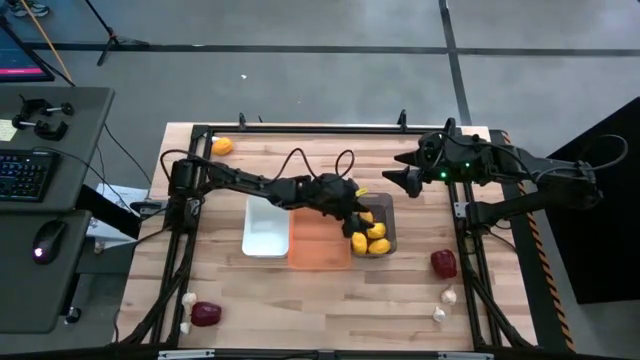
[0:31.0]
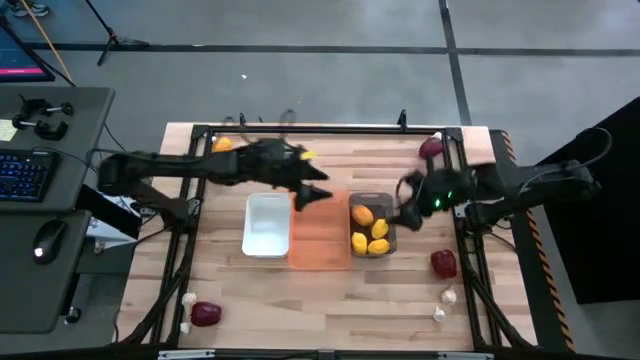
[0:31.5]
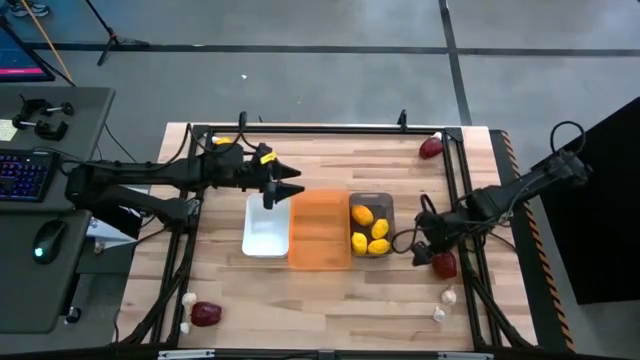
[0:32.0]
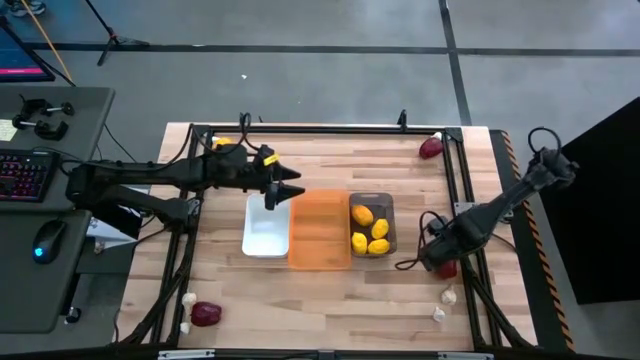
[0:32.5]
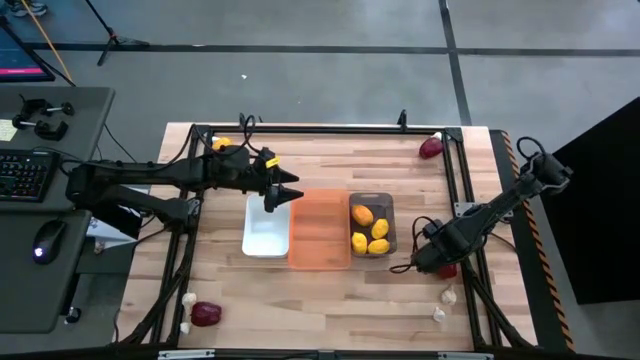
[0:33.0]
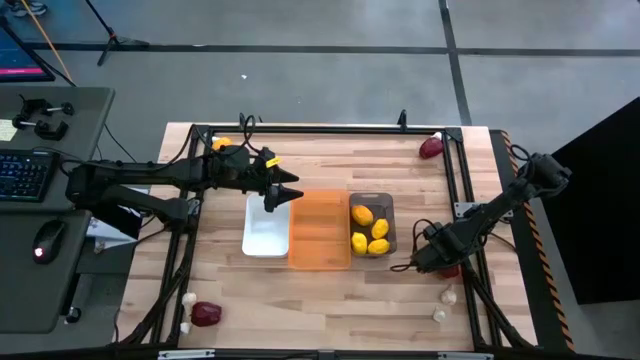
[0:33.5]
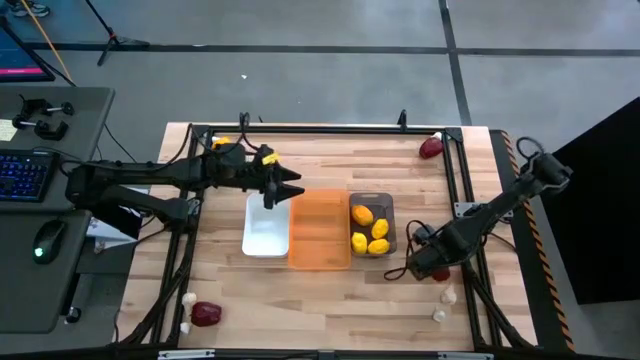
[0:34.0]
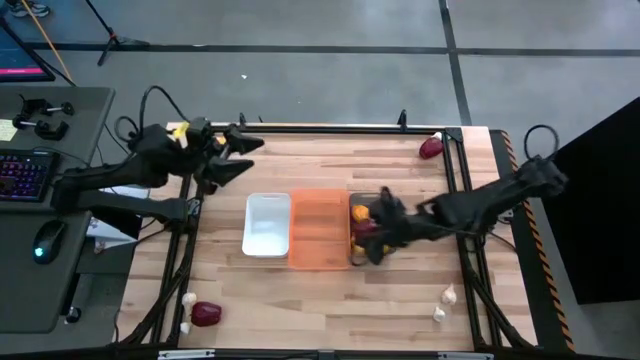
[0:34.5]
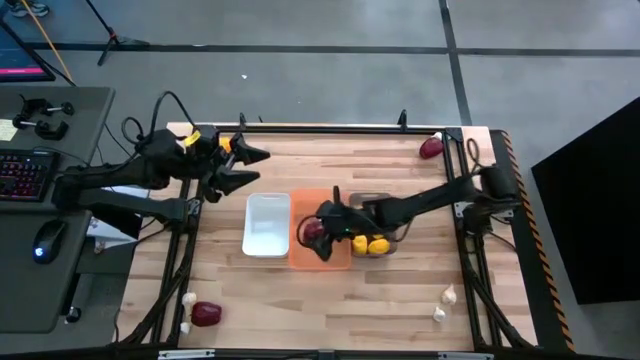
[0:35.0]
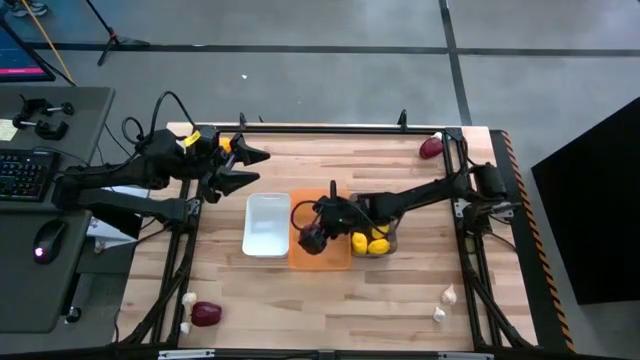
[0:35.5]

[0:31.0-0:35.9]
Task: Sort produce into baskets
Put the red apple into the orange bin

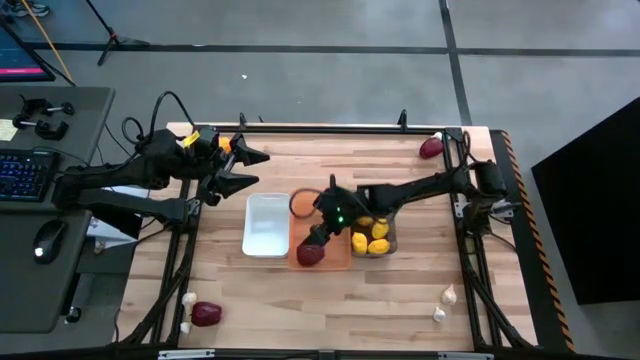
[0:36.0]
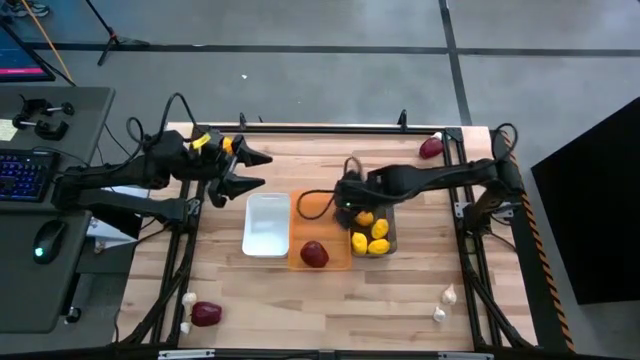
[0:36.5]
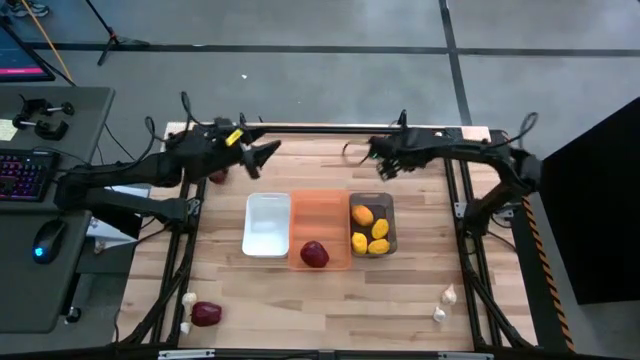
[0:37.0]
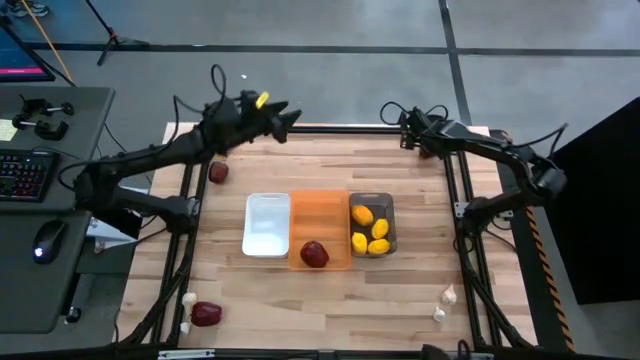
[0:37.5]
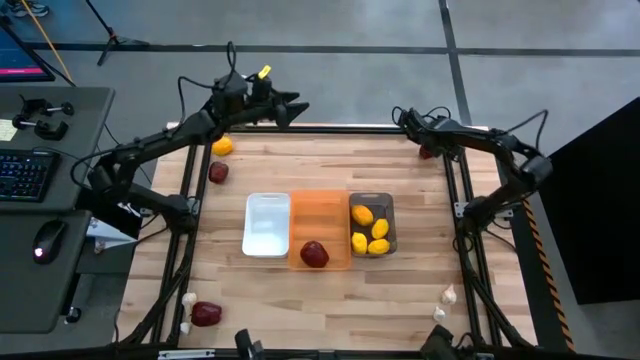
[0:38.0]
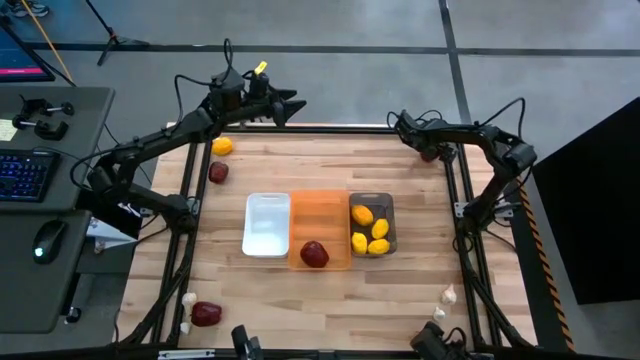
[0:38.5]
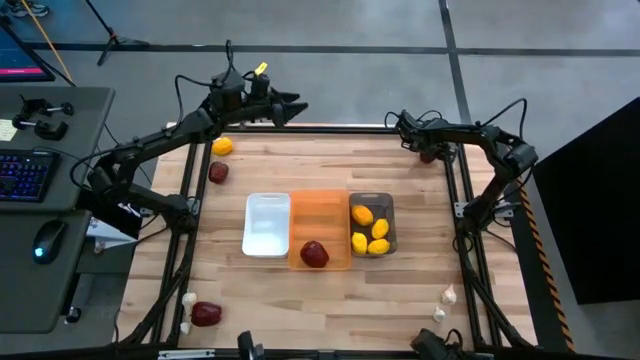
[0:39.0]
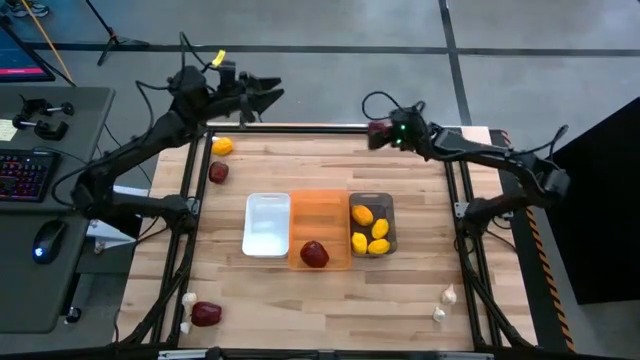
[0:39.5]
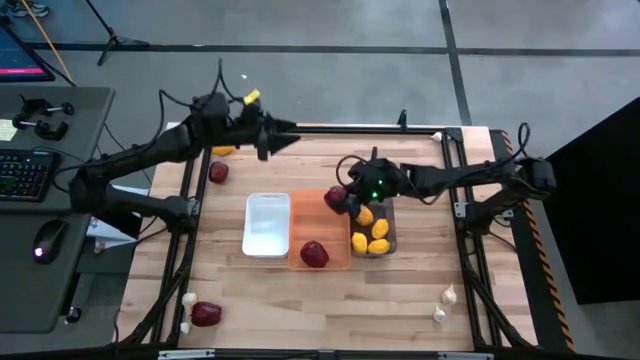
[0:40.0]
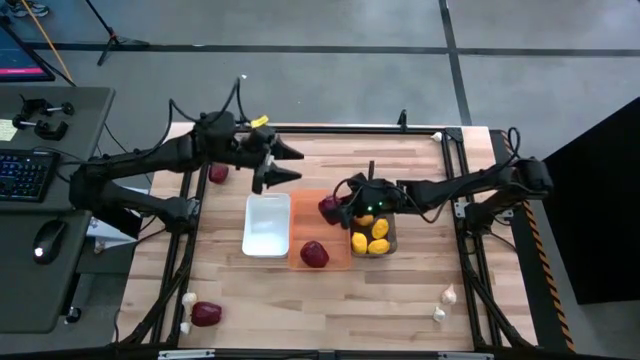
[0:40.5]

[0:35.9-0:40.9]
Put the red apple into the orange bin

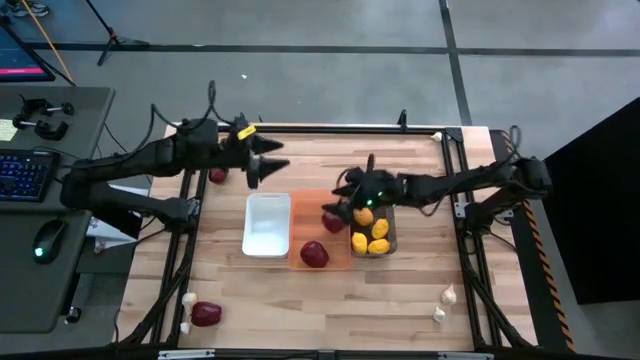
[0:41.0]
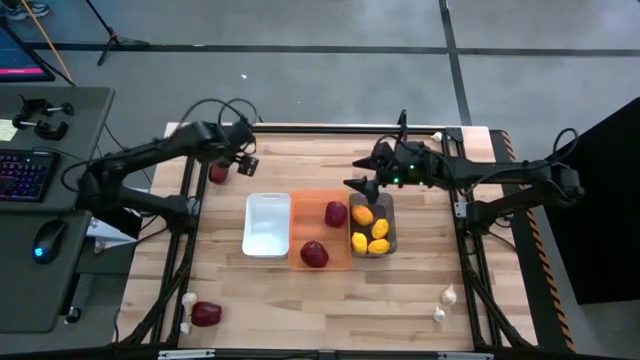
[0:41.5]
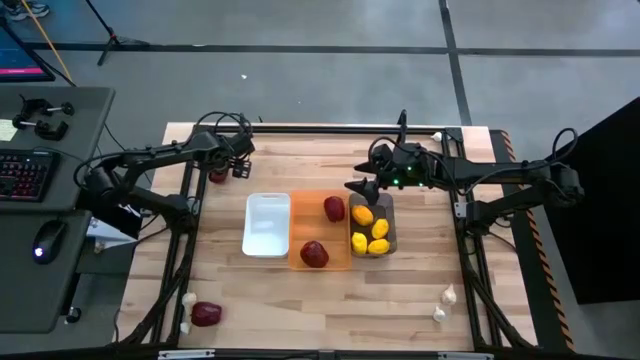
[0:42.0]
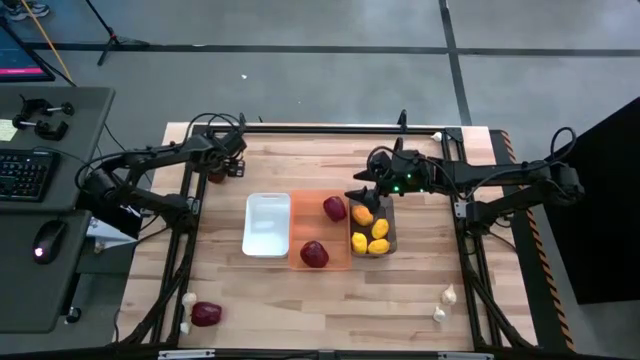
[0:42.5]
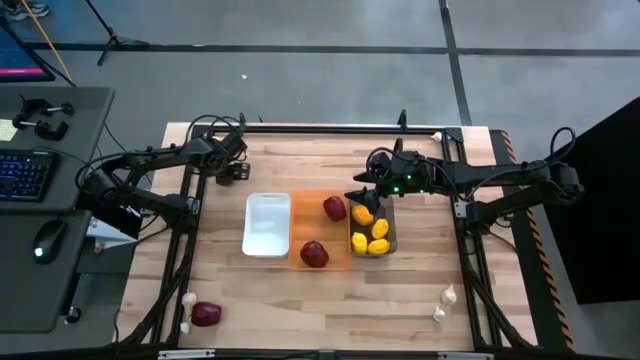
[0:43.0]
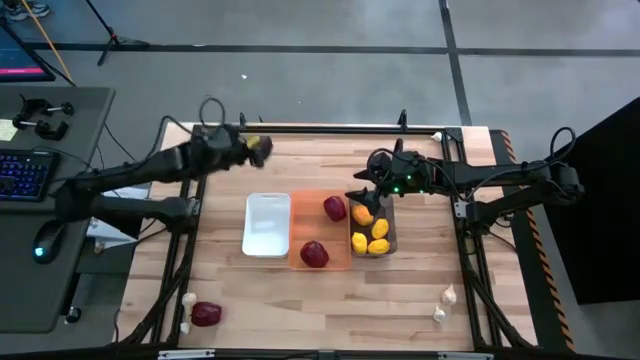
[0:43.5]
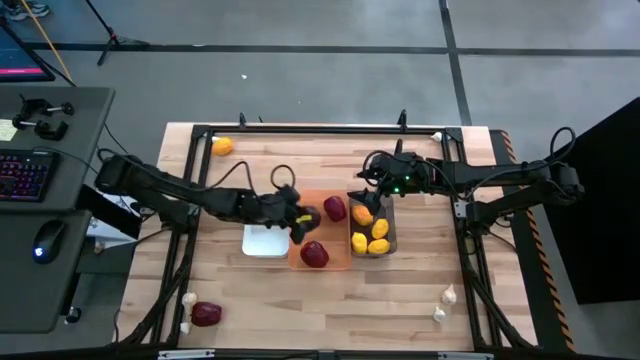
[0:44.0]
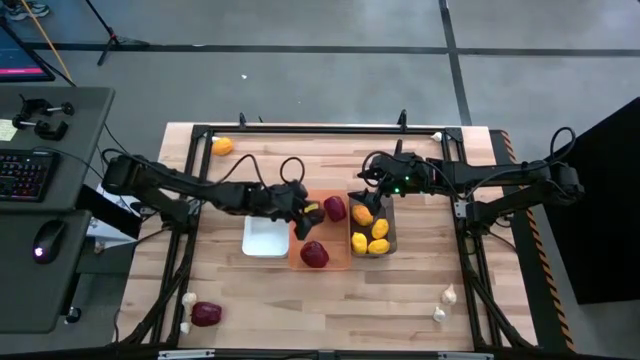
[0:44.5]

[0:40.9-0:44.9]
Put the red apple into the orange bin

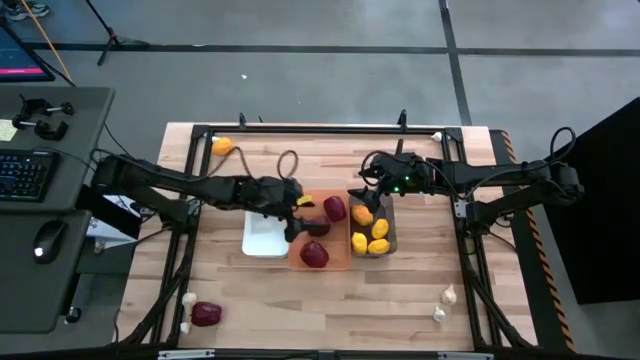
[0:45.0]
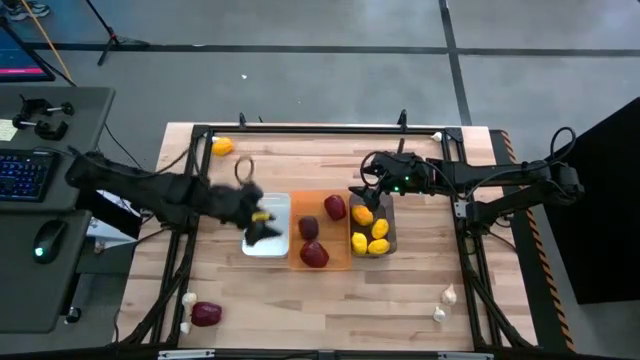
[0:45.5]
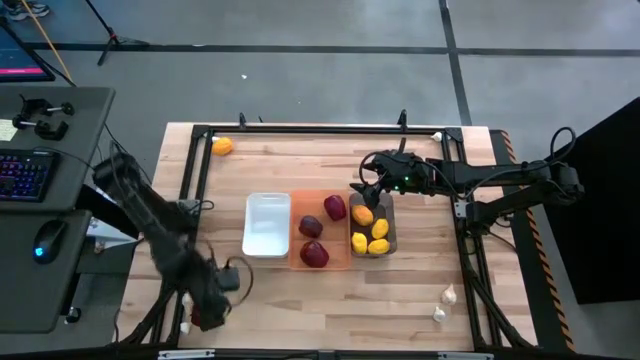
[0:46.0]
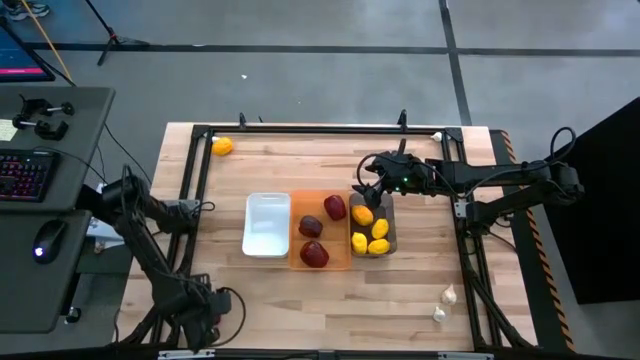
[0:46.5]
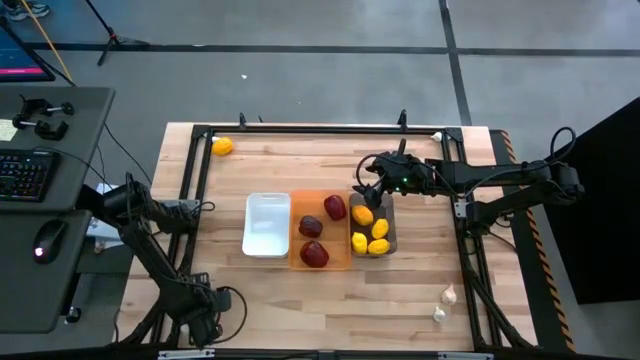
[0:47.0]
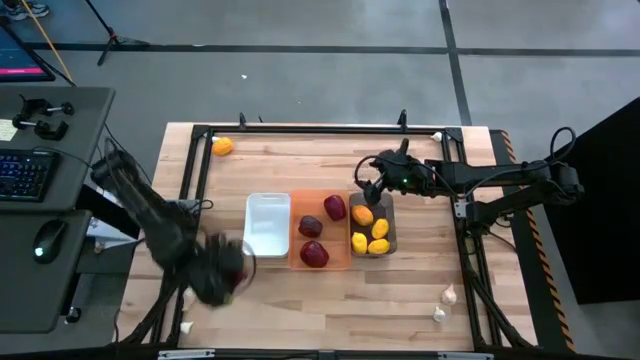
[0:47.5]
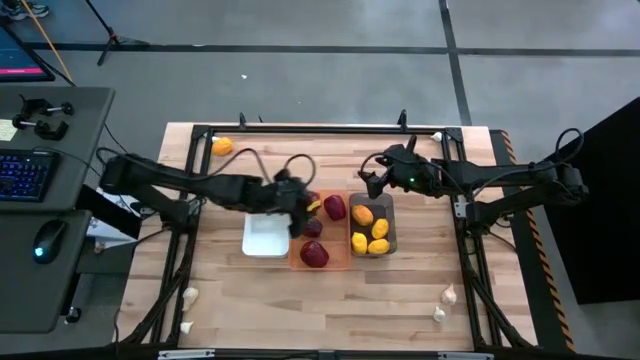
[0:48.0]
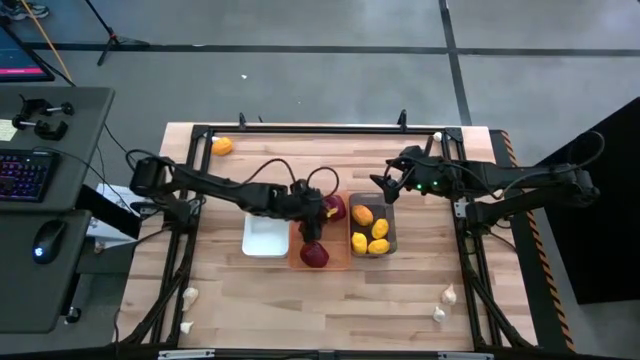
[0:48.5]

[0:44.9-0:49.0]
Put the red apple into the orange bin

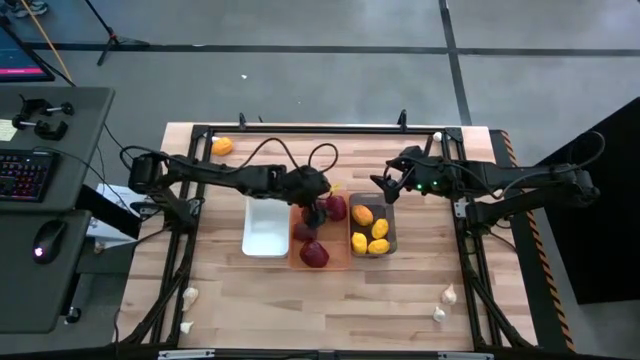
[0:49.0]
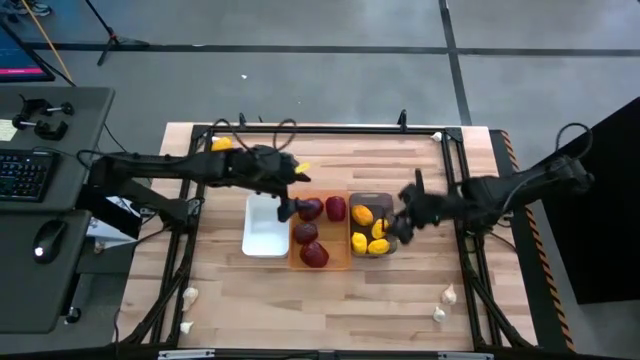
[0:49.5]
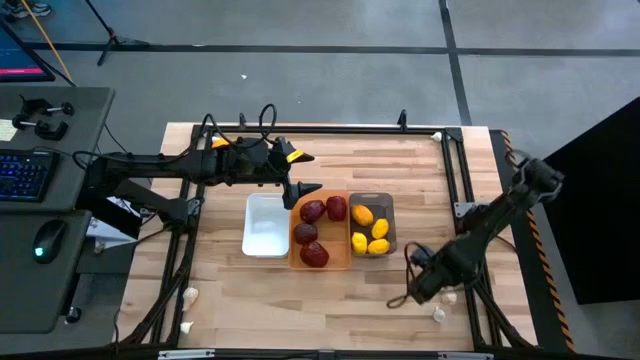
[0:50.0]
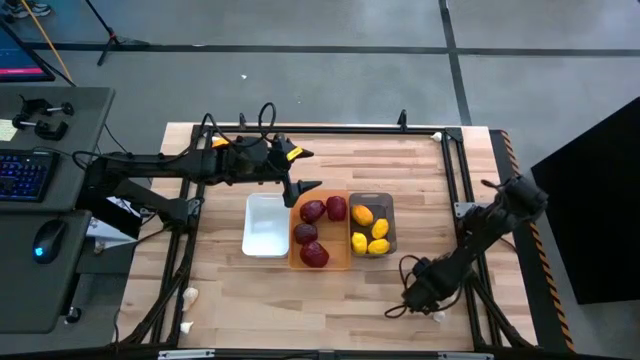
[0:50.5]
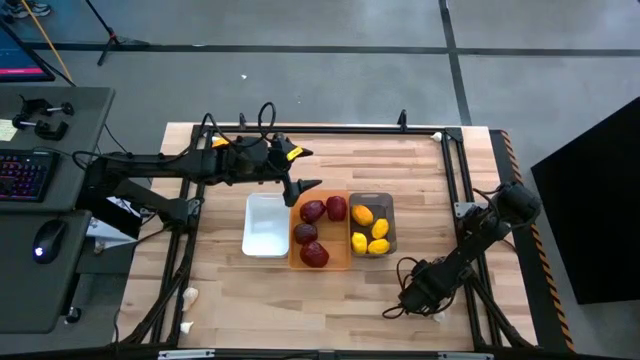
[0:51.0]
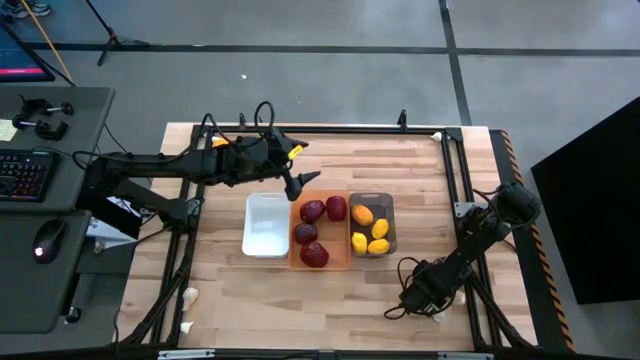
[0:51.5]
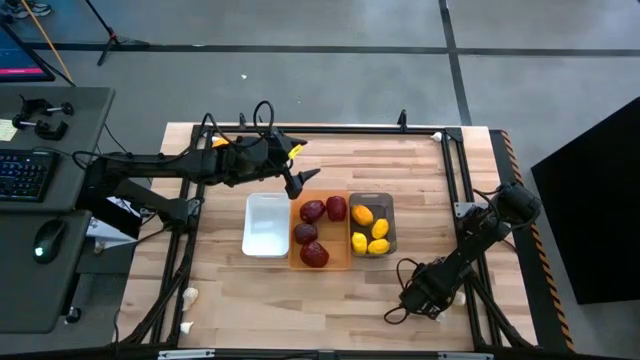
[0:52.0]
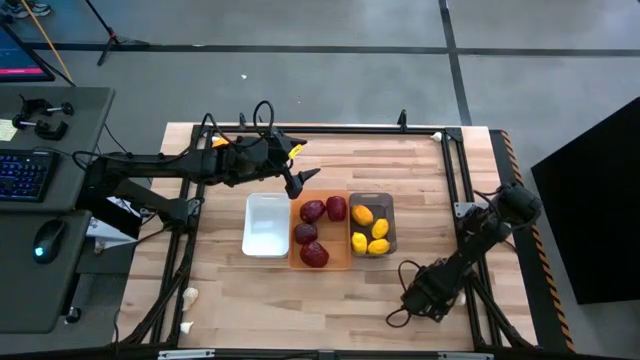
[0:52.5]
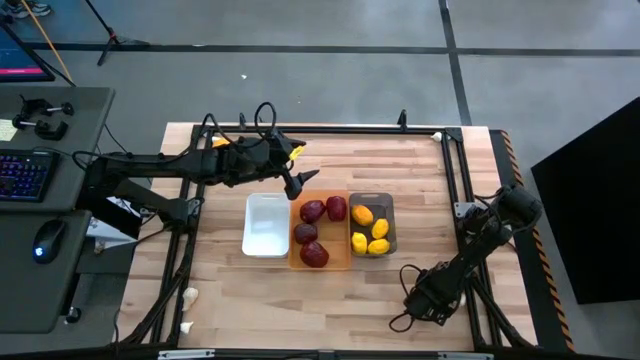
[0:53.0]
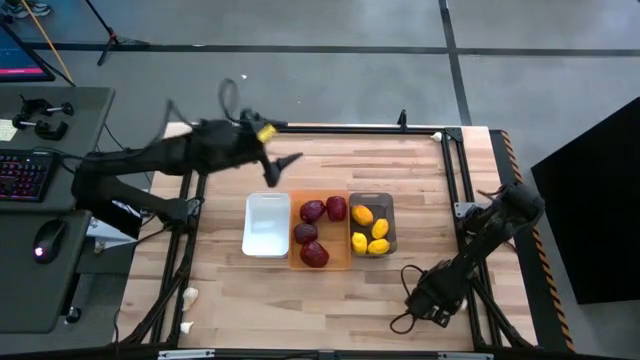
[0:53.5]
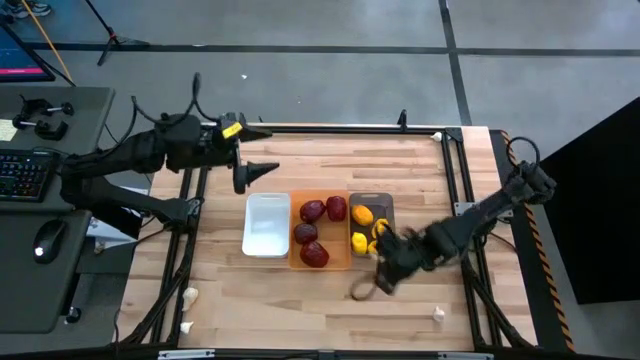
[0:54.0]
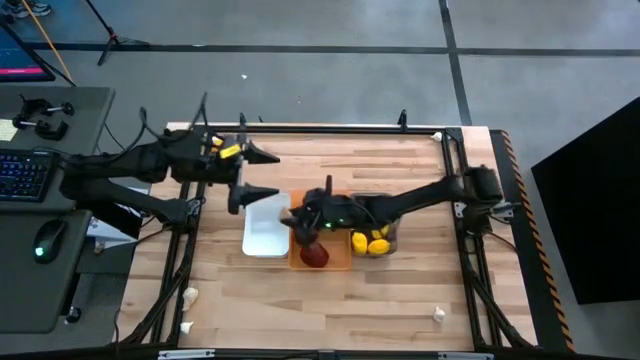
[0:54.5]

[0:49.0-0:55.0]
Put the white garlic into the white bin
